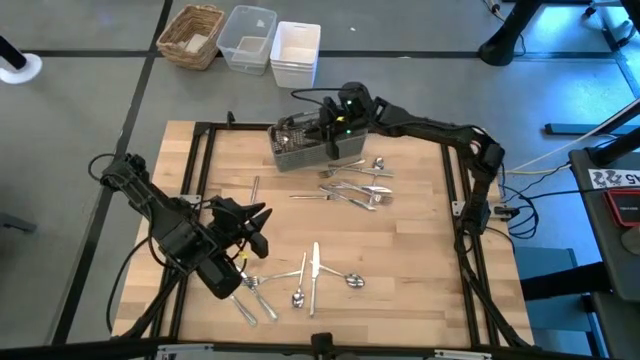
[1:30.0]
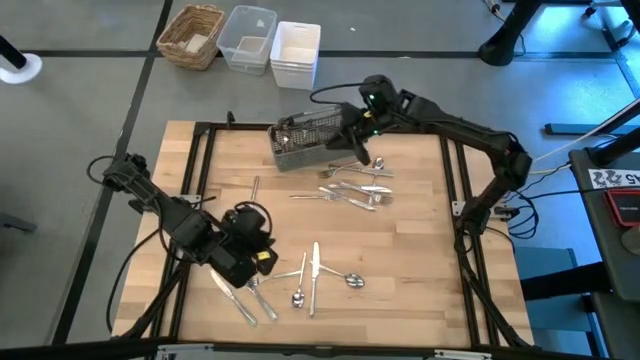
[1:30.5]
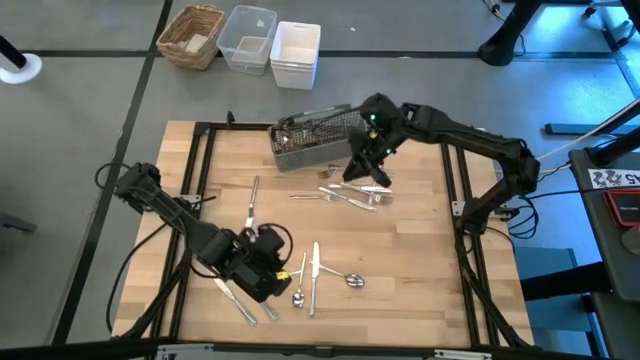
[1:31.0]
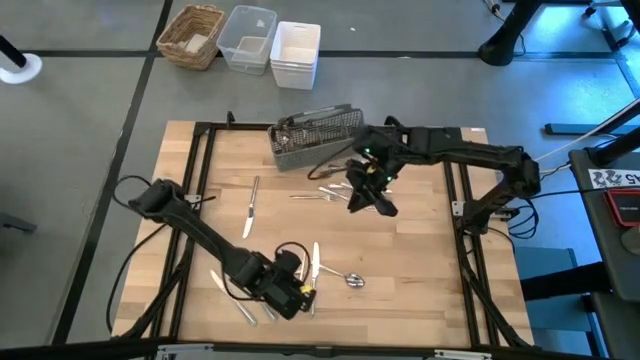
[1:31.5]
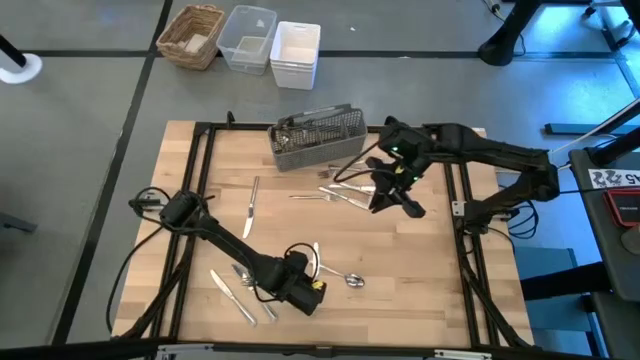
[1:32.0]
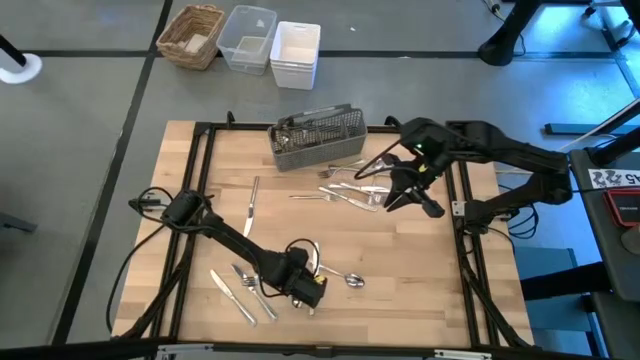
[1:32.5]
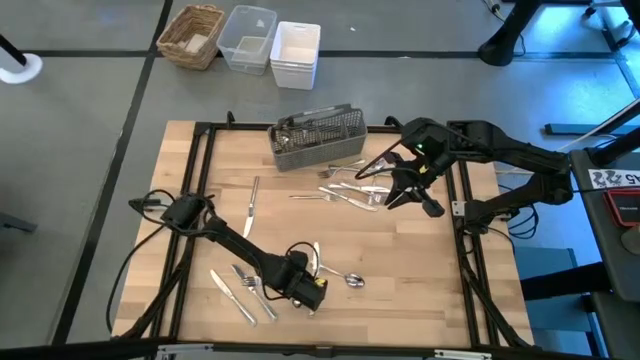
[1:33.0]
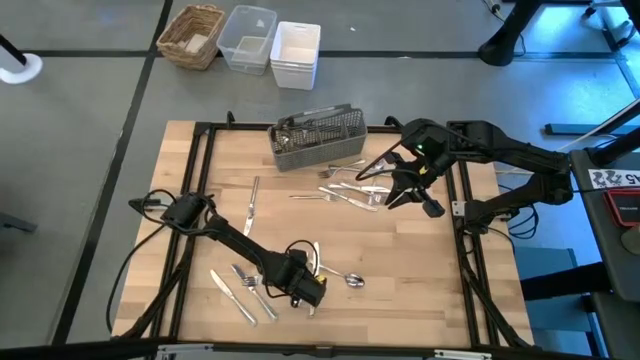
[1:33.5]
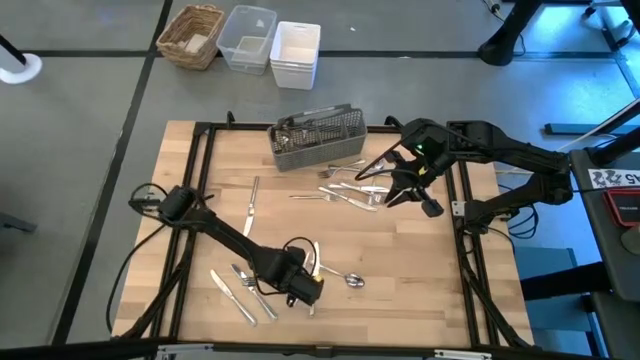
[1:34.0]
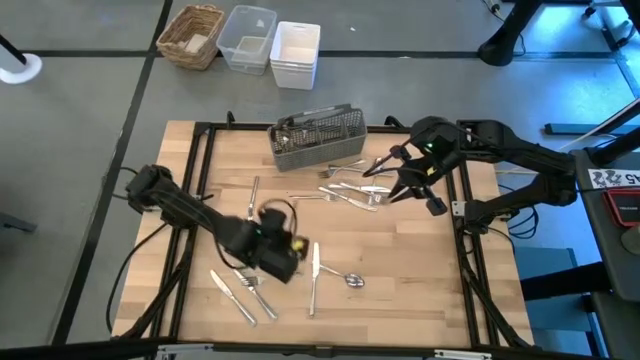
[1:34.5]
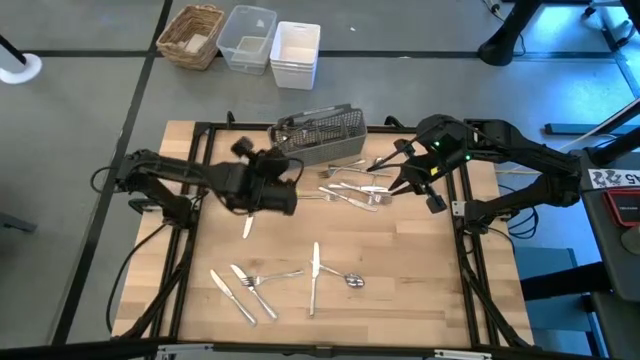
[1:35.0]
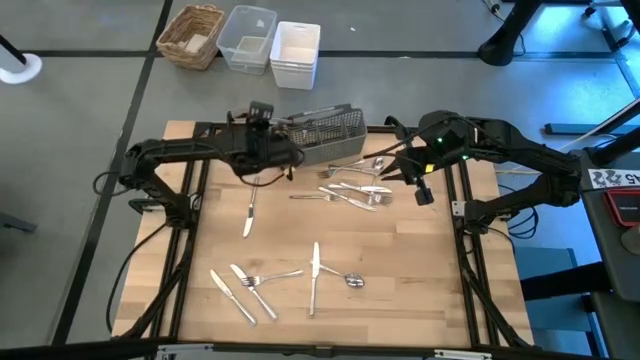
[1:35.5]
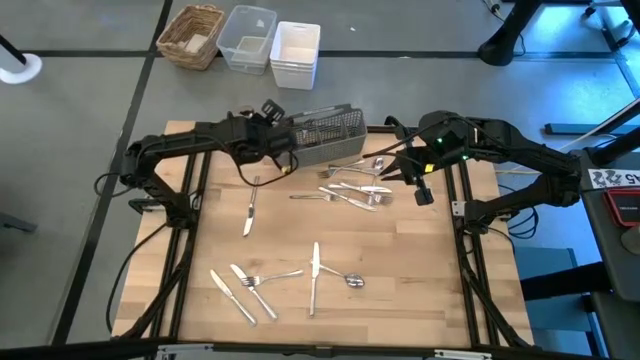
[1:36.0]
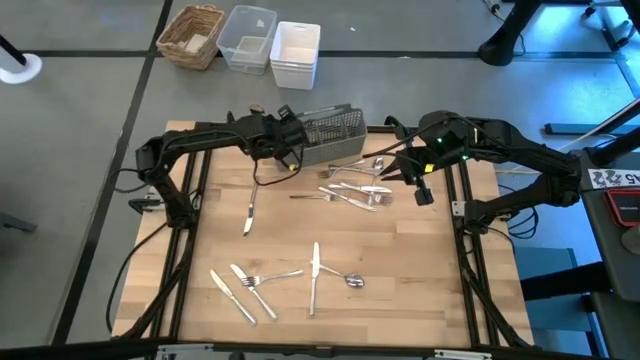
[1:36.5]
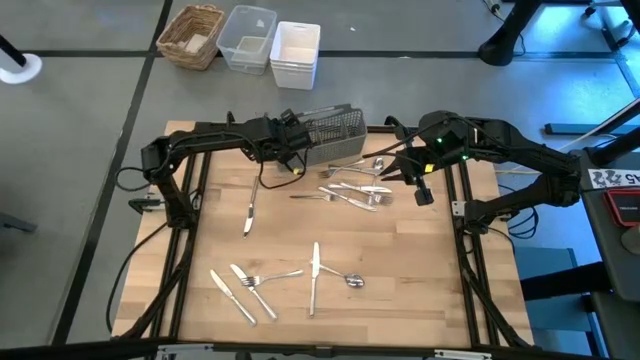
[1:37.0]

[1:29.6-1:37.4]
Task: Sort silverware
Put the silver spoon into the silverware rack

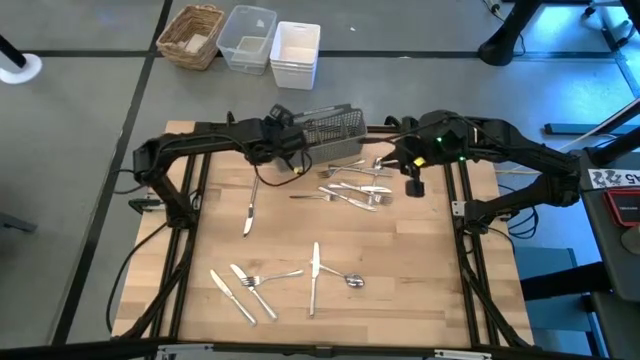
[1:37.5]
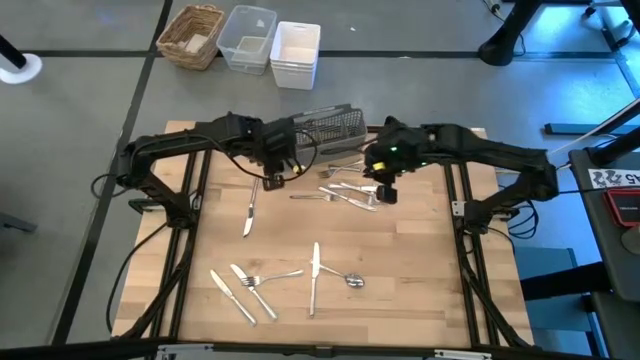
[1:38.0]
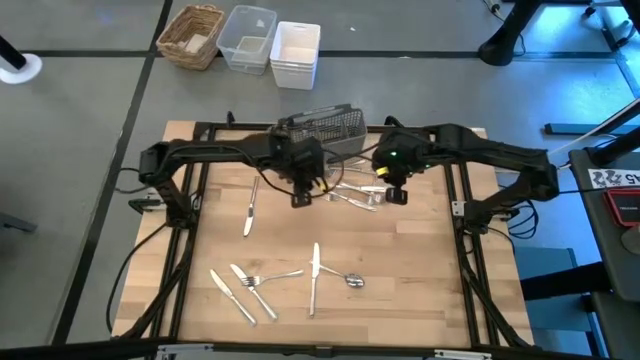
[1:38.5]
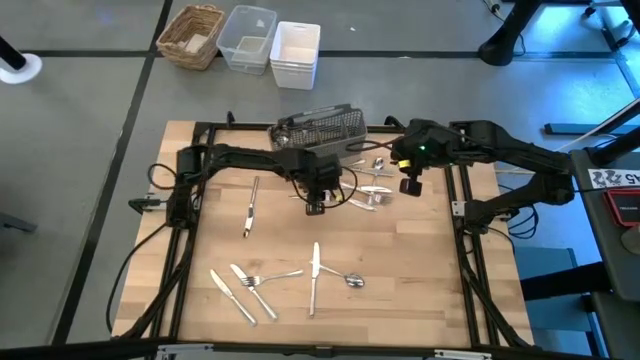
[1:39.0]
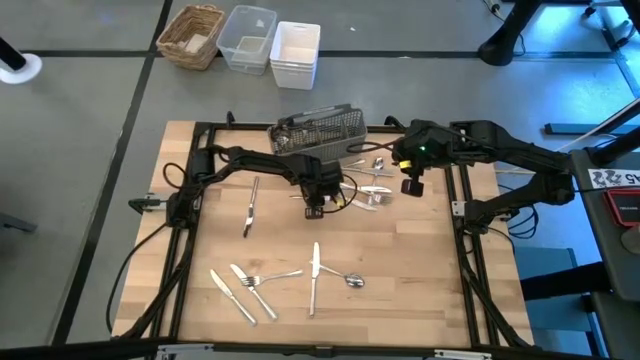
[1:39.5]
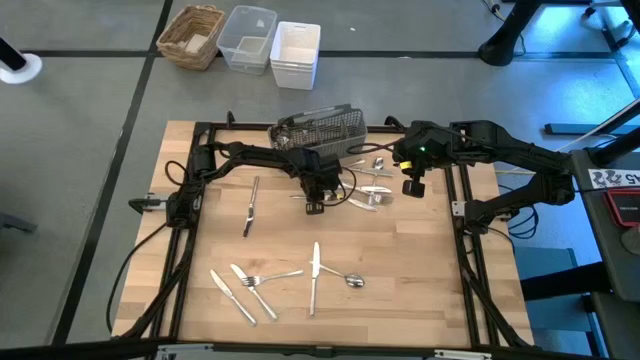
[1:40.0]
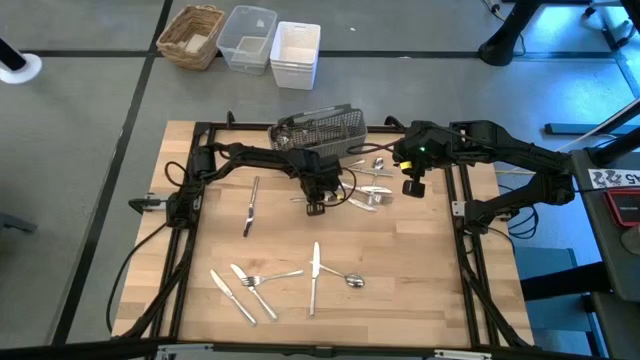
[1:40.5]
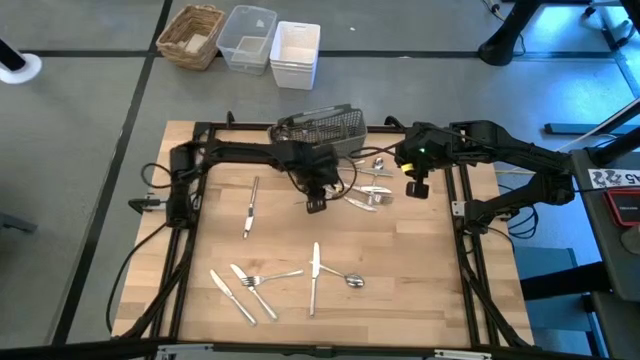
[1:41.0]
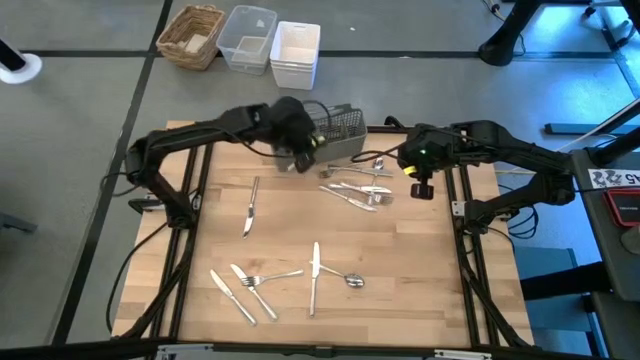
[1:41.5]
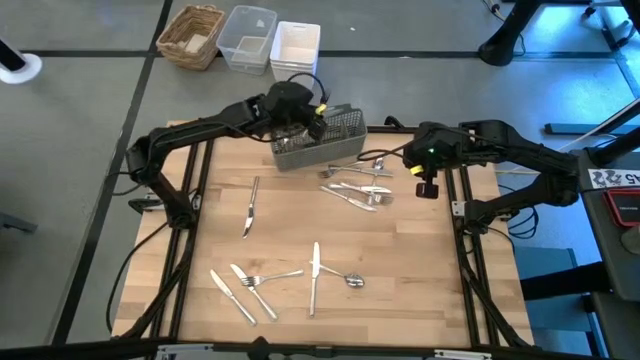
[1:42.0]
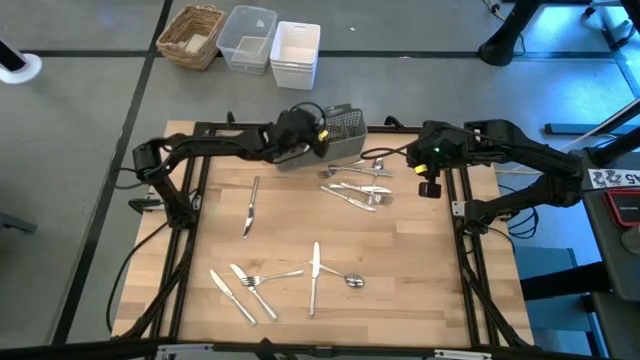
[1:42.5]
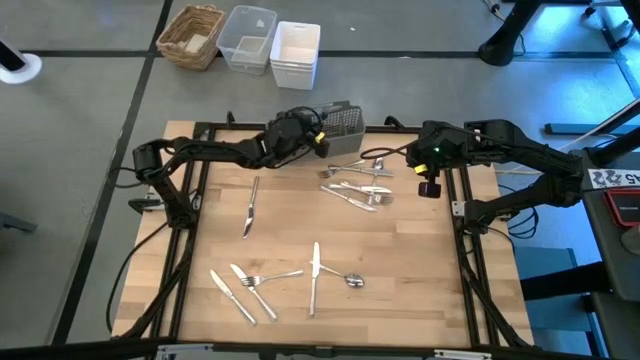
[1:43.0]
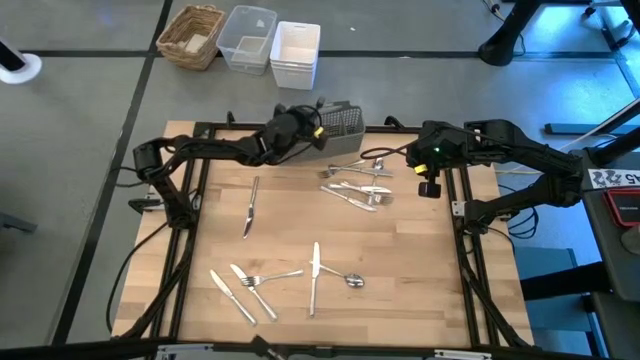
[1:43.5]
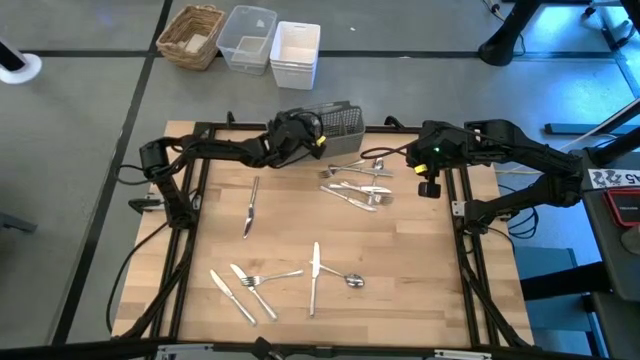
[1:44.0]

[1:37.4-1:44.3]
Put the silver fork into the silverware rack

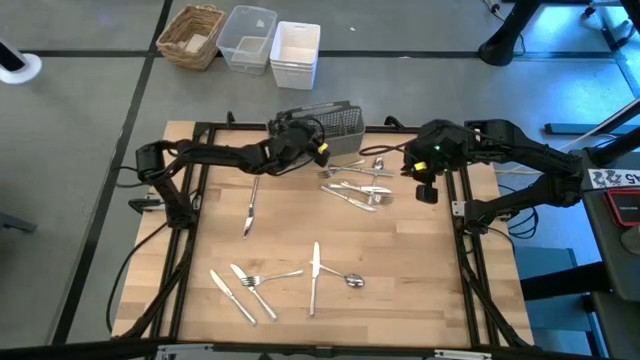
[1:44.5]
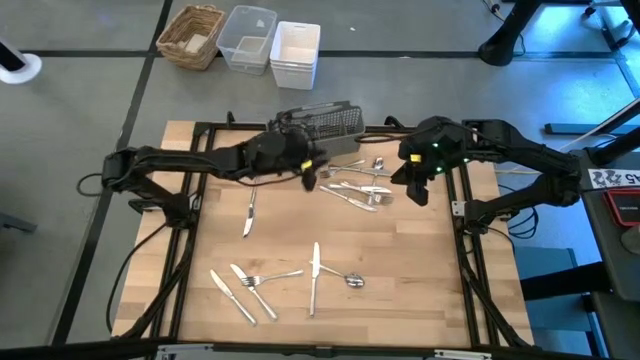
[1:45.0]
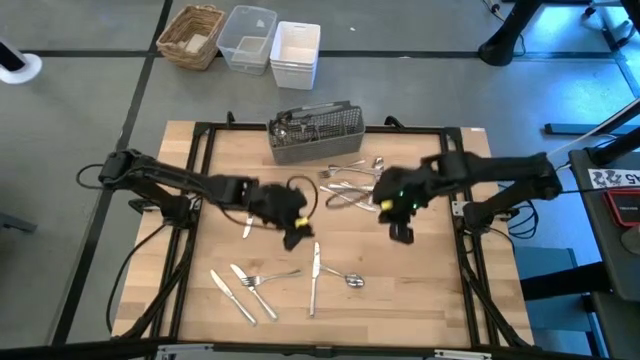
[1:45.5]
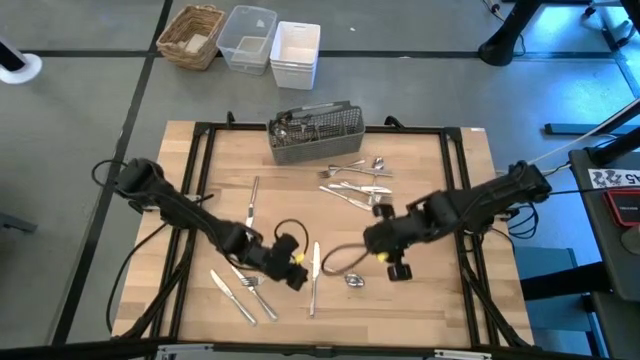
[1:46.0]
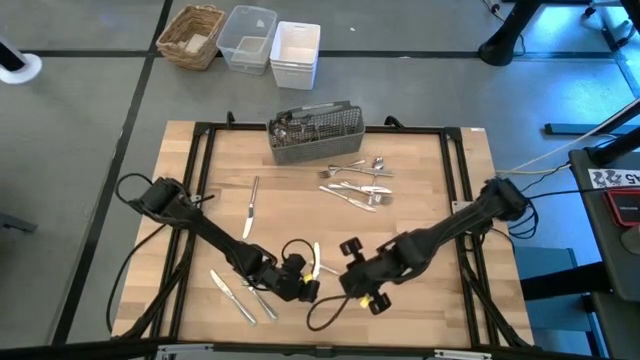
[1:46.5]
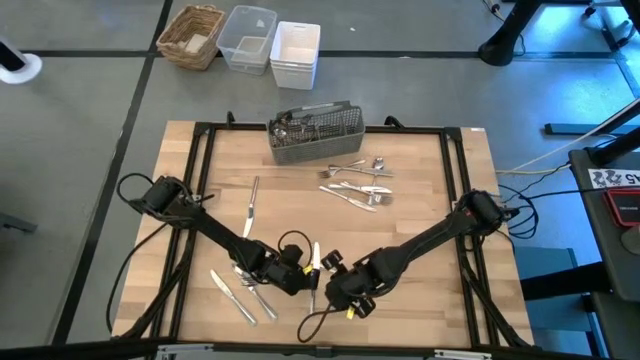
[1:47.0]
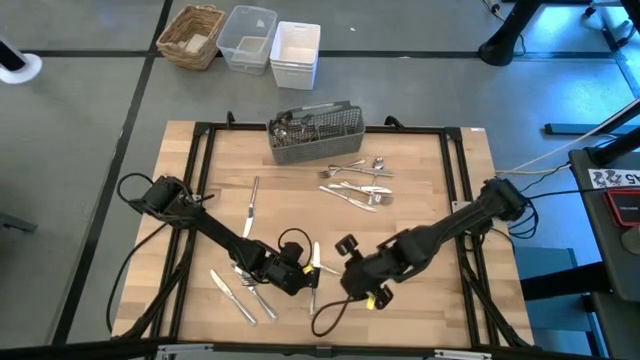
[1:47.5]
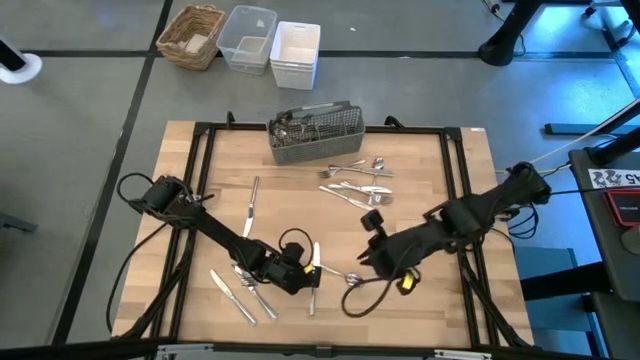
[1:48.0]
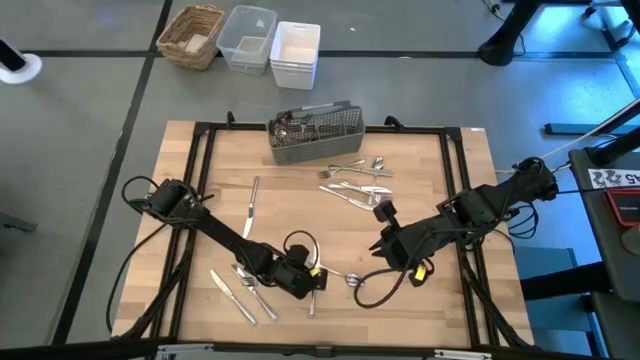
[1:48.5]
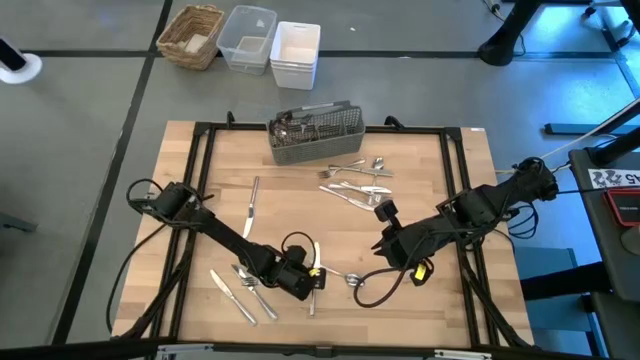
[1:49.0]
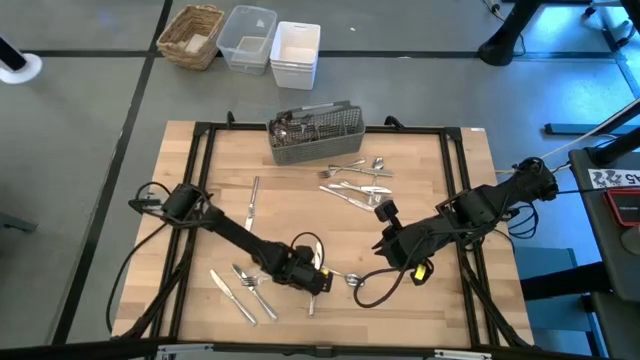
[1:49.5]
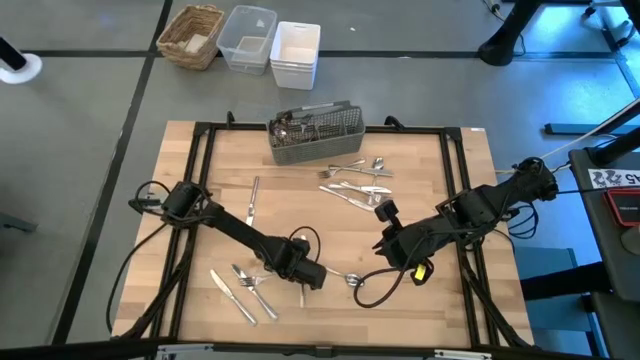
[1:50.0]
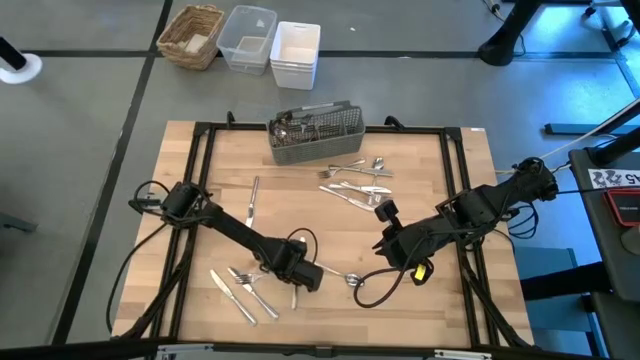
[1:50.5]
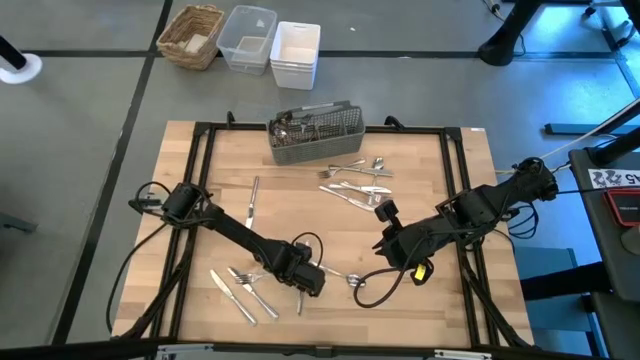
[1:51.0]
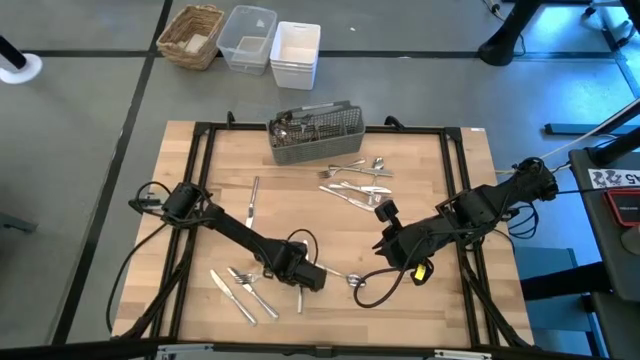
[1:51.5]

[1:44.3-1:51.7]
Put the silver knife into the silverware rack
